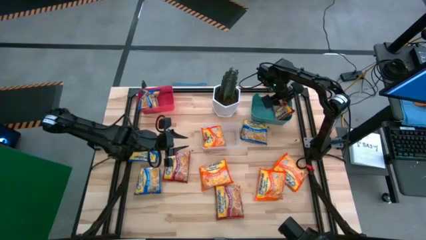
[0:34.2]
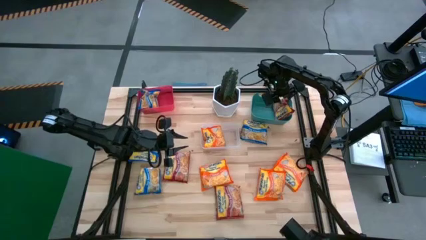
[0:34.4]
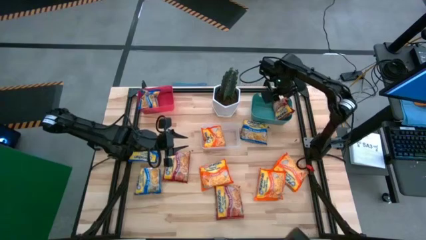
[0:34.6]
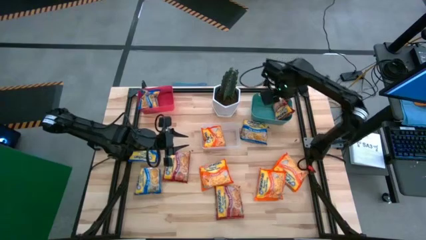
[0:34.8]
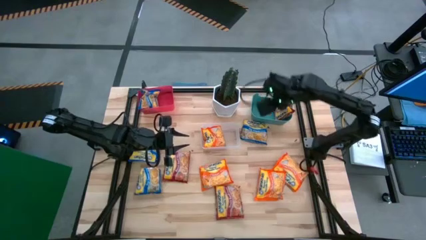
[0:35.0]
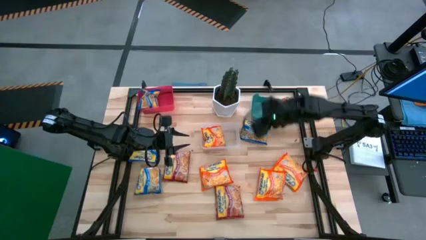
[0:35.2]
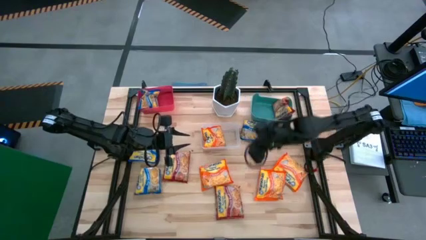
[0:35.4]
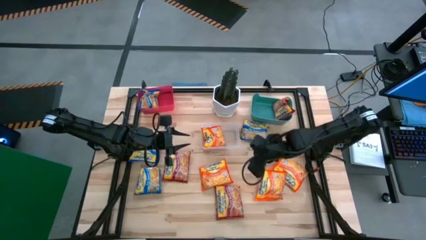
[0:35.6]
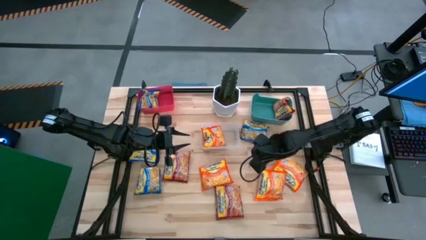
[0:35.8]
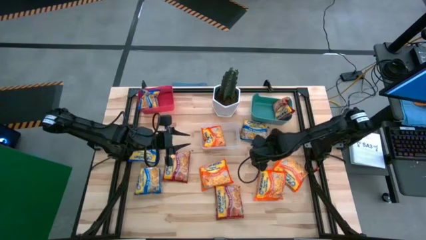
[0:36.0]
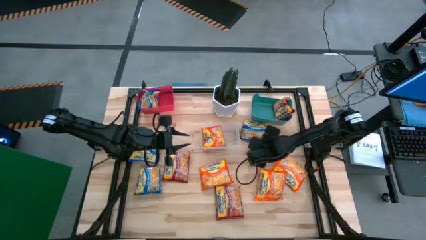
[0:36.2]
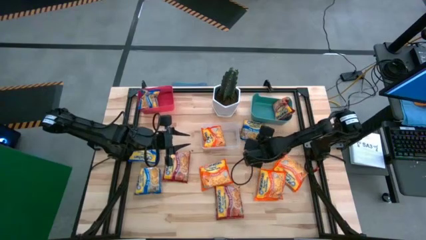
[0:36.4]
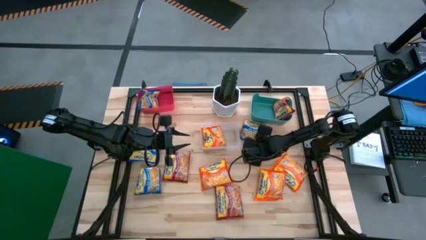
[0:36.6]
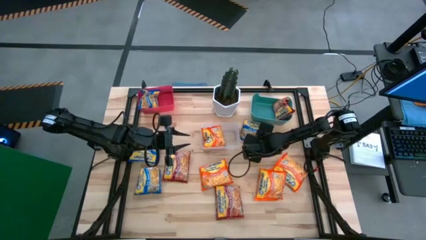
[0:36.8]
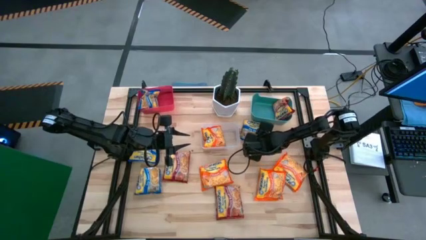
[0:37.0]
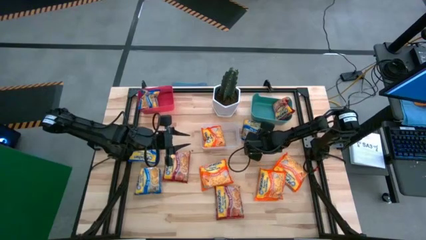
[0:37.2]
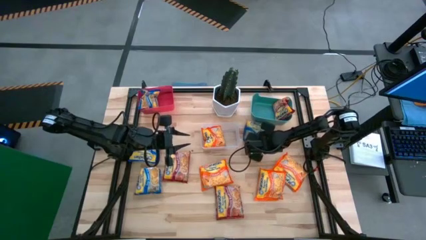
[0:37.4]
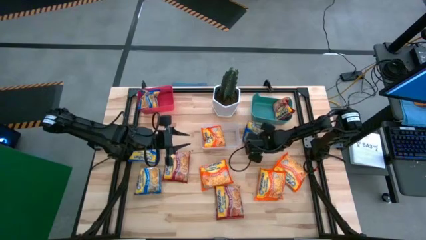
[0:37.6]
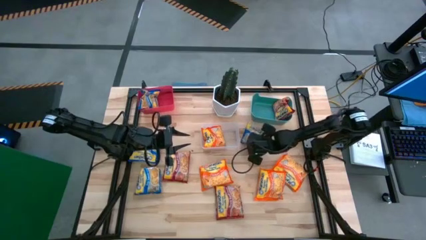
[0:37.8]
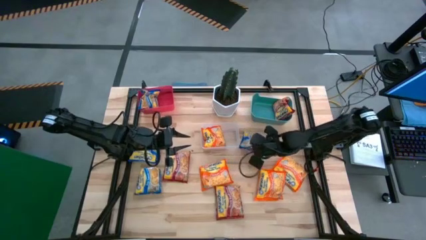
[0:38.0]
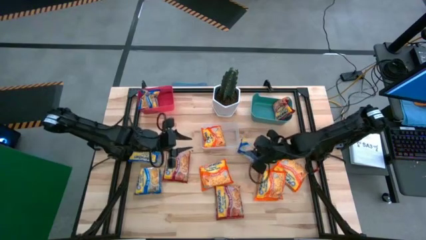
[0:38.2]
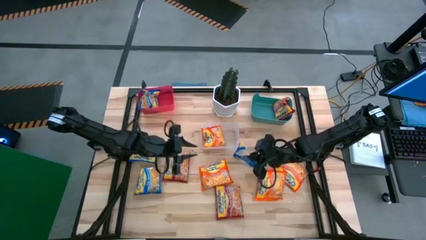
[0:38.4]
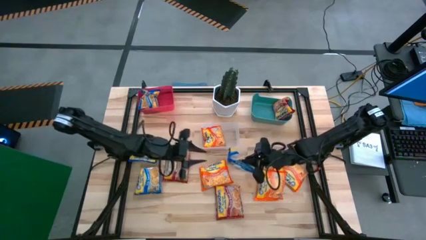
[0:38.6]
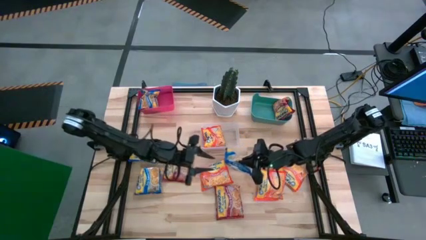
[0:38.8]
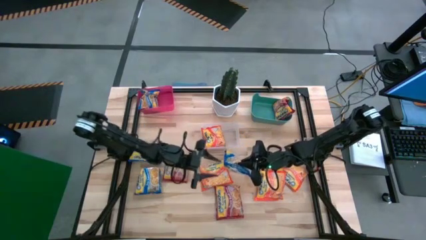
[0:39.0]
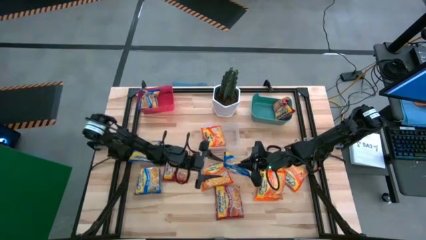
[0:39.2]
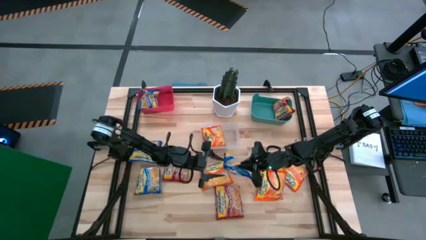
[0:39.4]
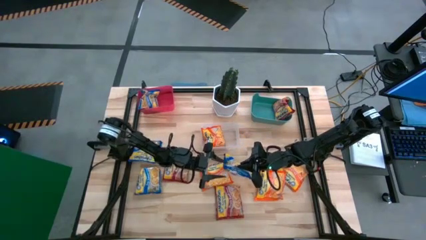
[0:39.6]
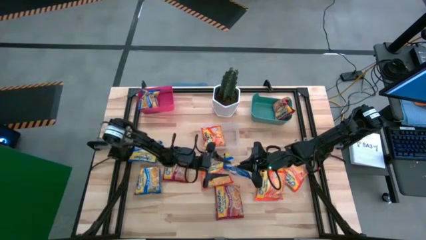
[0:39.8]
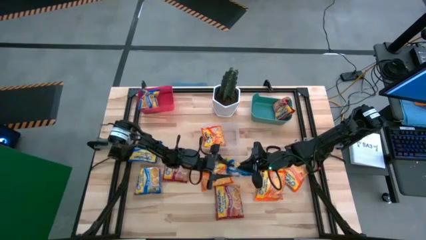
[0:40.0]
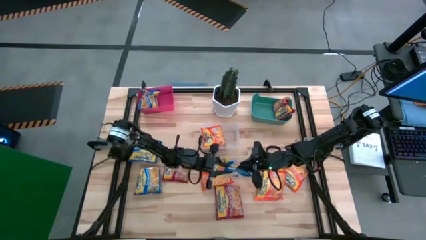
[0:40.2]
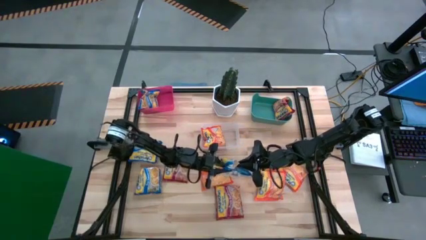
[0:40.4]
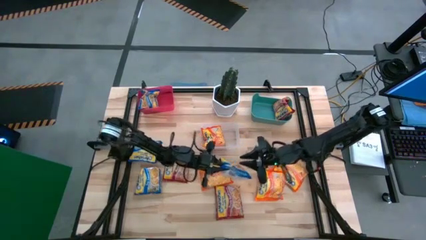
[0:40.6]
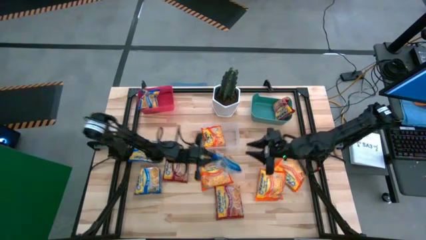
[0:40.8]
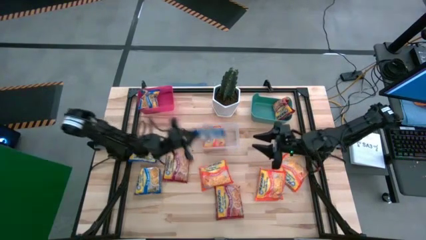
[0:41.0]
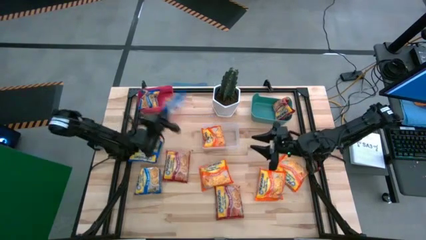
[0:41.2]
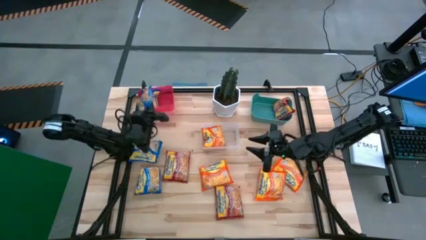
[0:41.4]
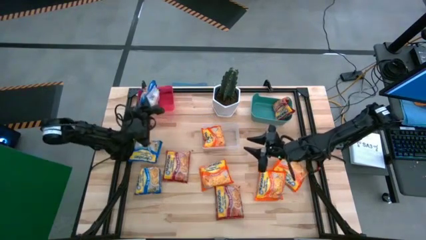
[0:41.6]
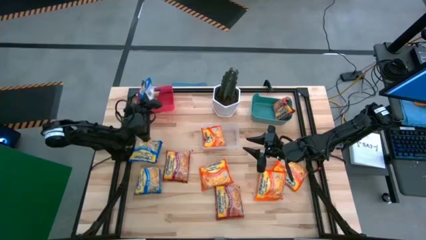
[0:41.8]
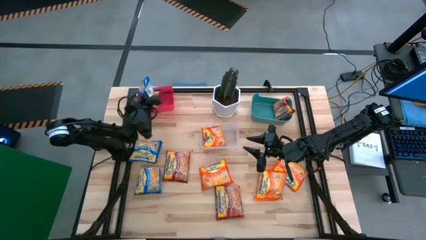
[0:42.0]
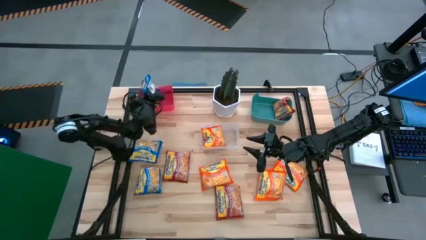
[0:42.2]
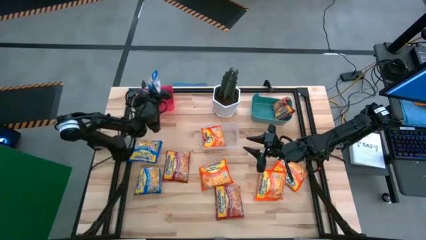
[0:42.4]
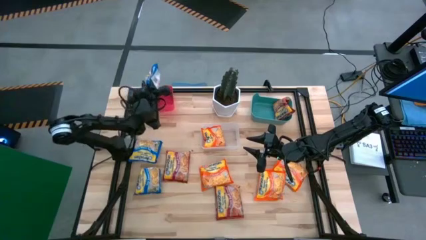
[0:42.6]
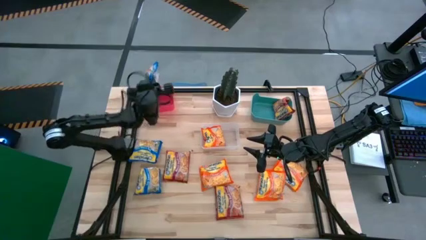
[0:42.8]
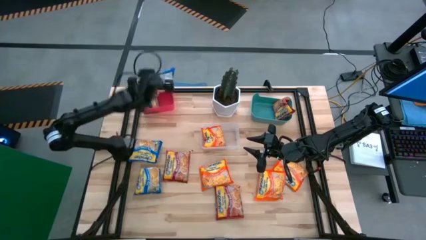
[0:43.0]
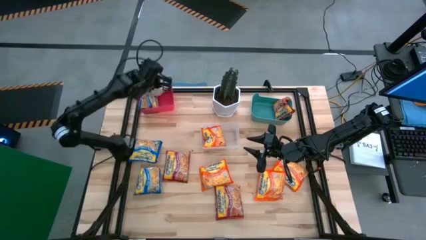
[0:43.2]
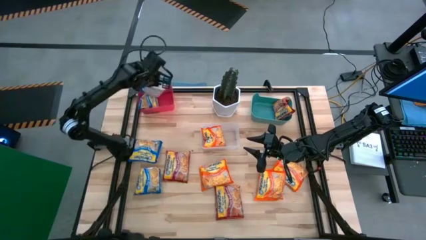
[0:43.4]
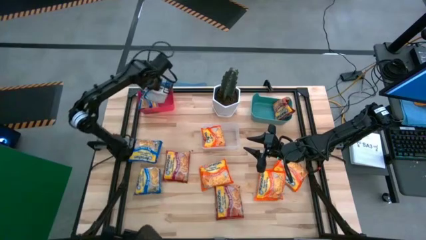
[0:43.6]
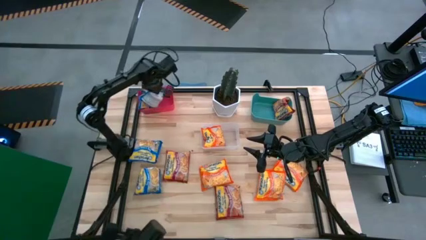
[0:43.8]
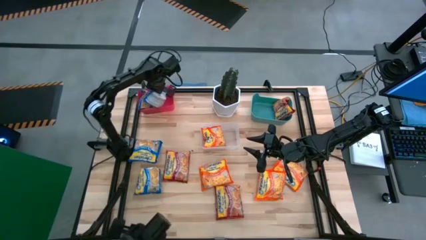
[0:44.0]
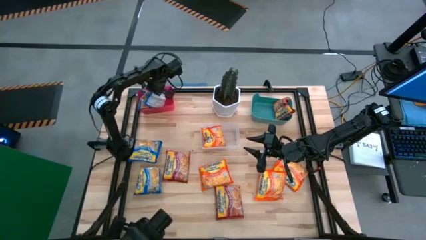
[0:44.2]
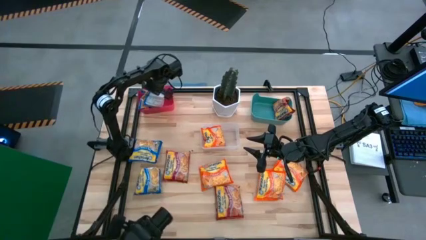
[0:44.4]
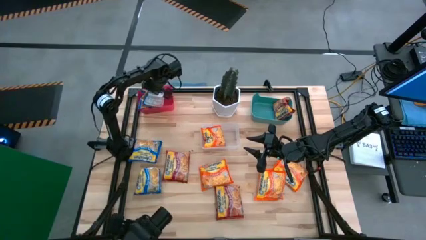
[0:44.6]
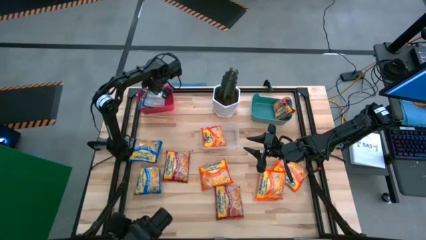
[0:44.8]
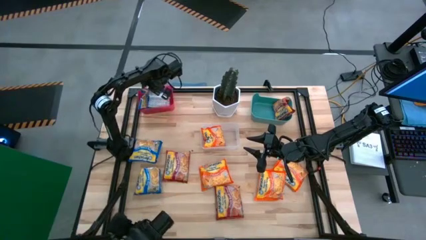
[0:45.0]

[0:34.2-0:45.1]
Task: Sort Maruchan noodles
Put the blue noodle pack into the red bin

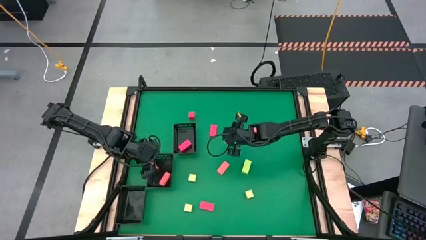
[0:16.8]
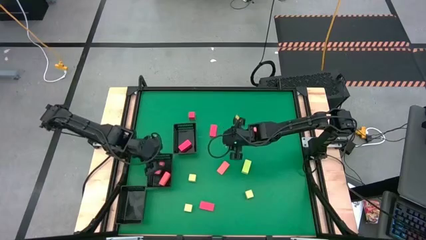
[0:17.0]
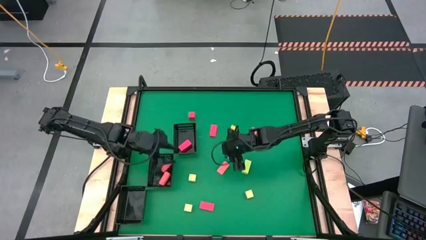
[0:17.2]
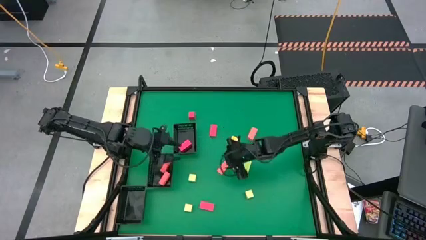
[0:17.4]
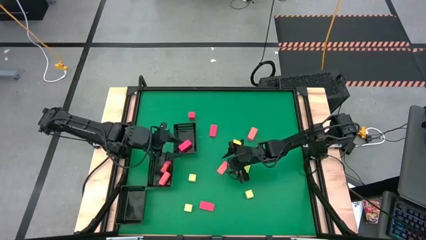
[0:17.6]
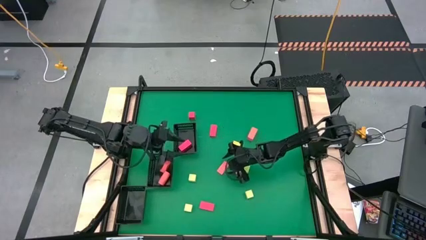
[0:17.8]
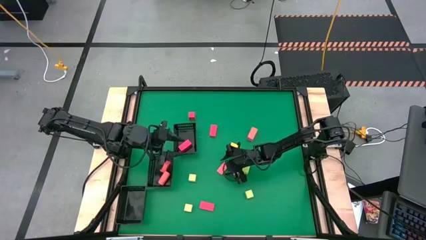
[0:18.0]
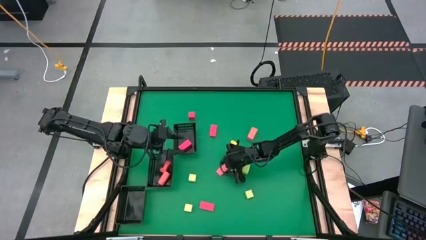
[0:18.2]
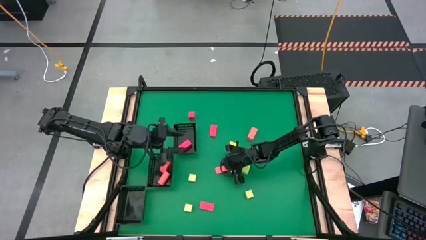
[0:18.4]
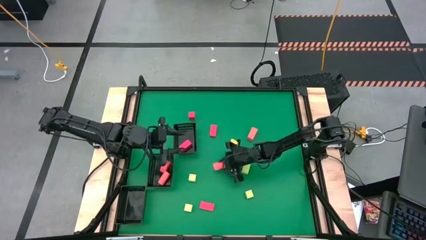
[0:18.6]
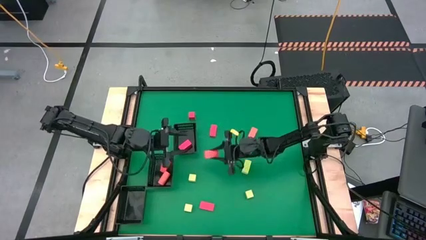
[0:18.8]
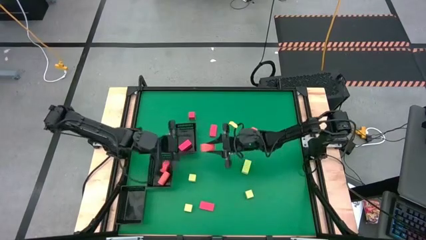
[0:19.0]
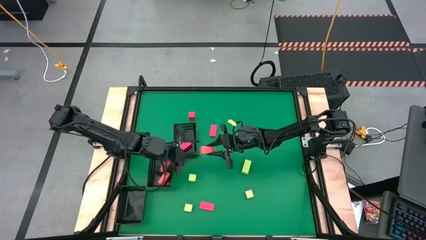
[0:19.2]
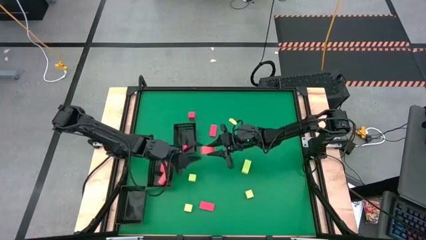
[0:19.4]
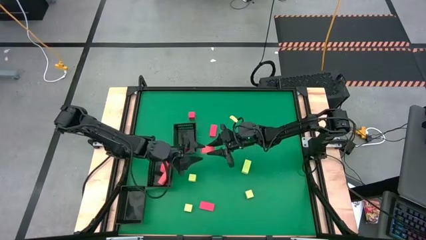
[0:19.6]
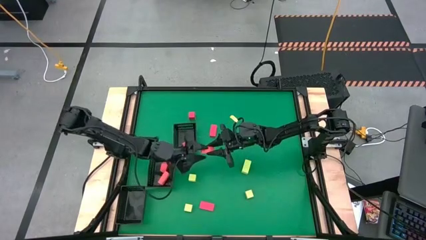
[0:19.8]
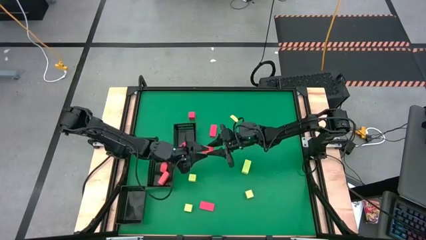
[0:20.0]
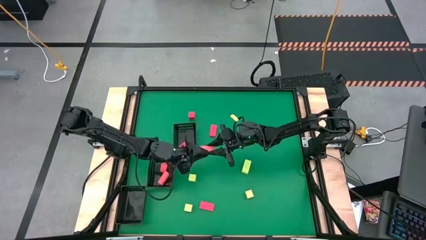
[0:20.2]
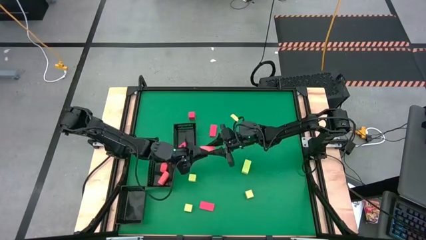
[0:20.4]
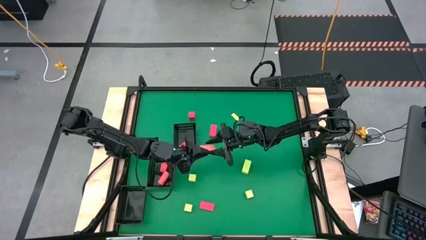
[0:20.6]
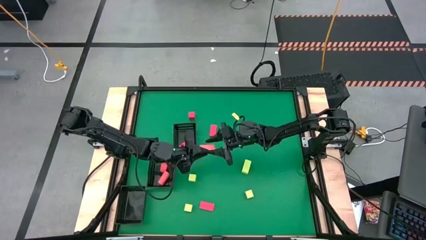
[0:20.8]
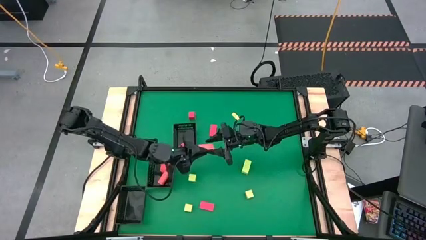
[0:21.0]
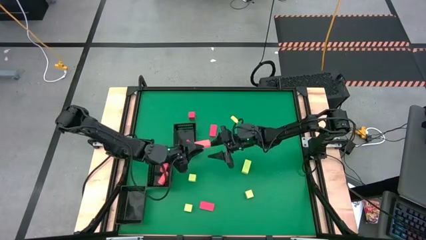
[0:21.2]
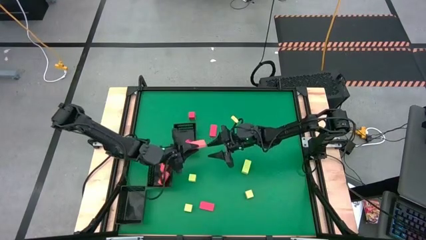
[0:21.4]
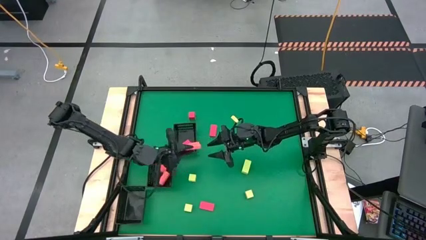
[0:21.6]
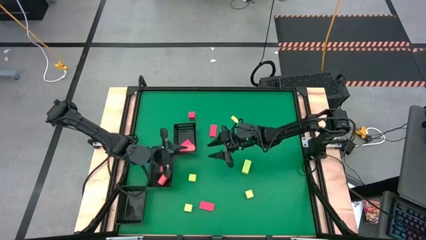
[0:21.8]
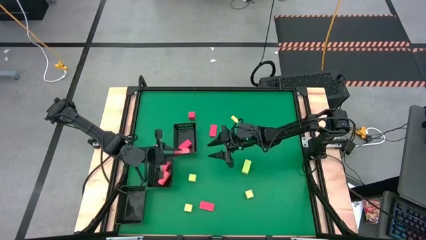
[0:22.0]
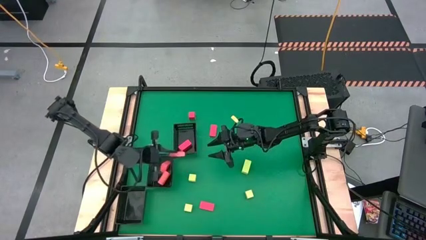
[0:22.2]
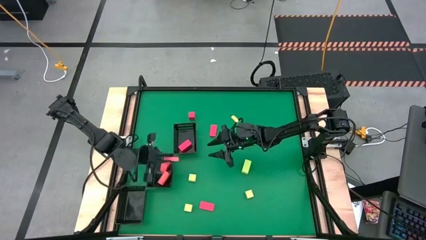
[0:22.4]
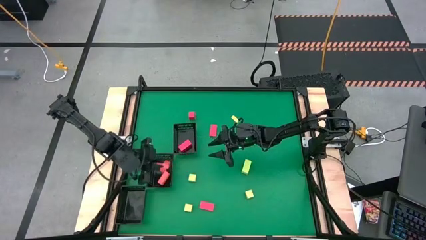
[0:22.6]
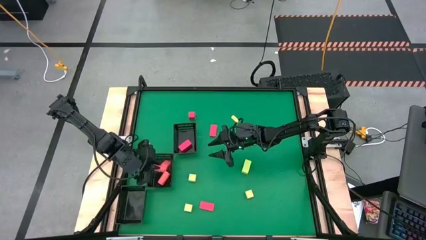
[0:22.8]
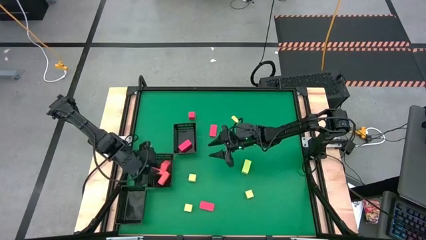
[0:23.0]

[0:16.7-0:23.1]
Task: Sort & place blocks by color
Put the orange block into the middle black bin
